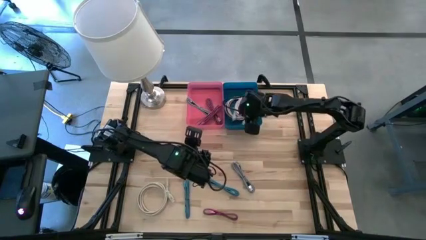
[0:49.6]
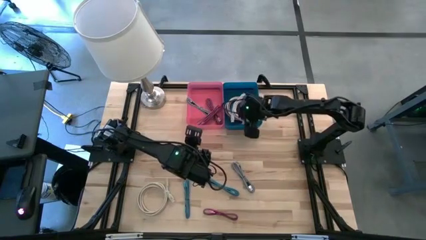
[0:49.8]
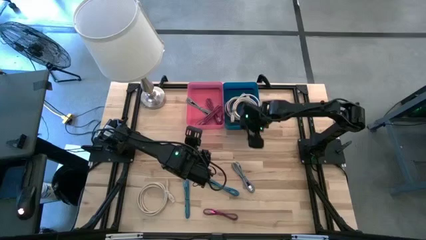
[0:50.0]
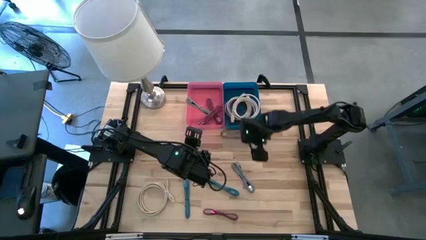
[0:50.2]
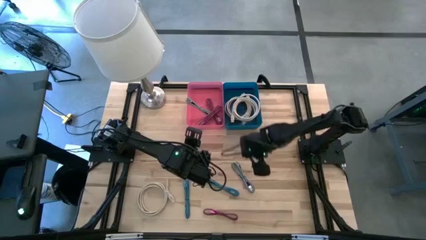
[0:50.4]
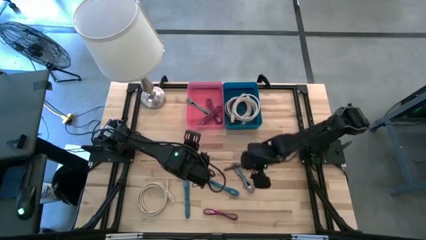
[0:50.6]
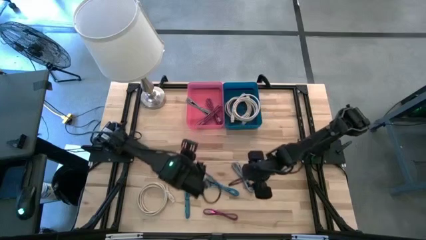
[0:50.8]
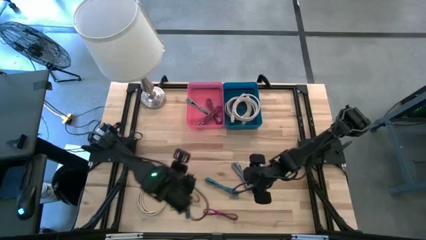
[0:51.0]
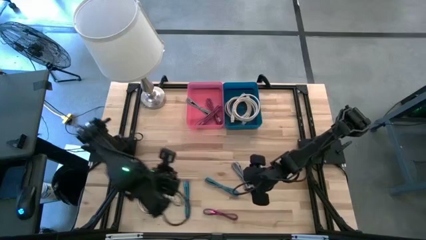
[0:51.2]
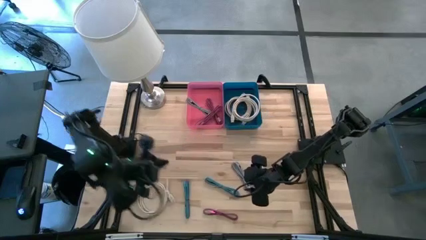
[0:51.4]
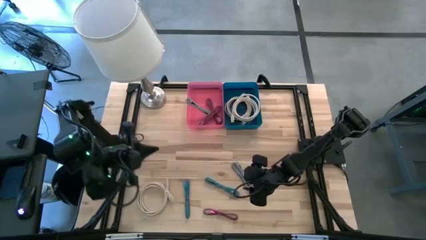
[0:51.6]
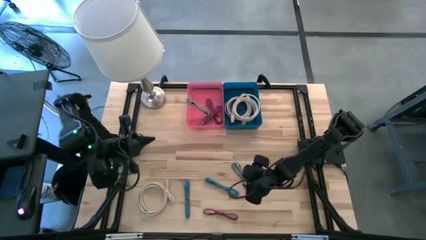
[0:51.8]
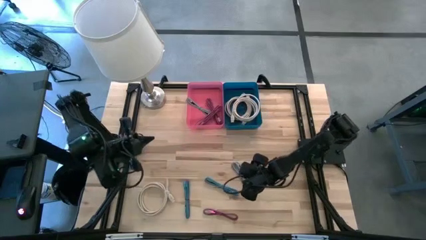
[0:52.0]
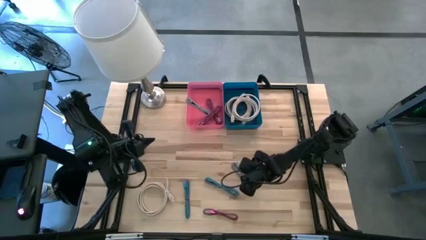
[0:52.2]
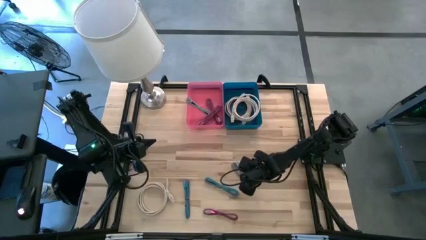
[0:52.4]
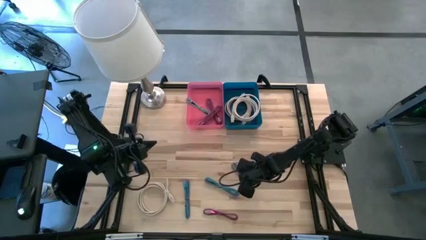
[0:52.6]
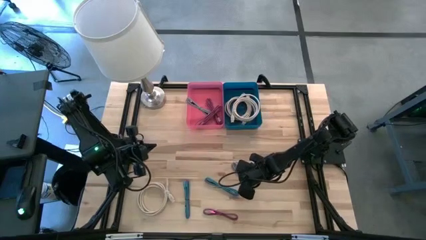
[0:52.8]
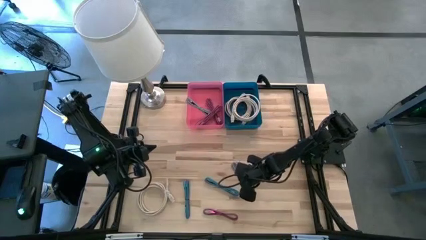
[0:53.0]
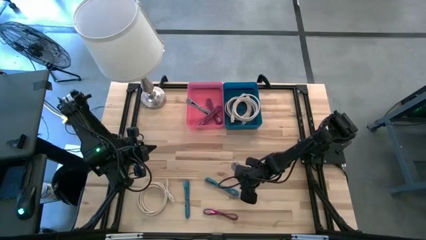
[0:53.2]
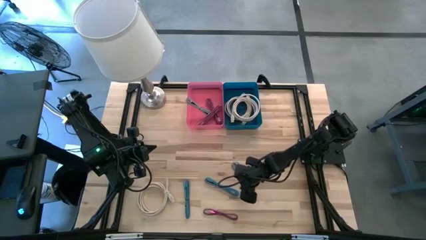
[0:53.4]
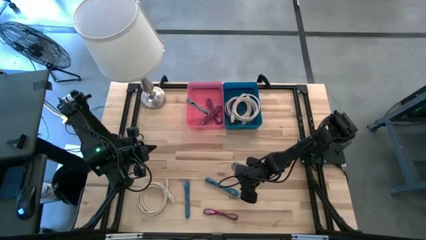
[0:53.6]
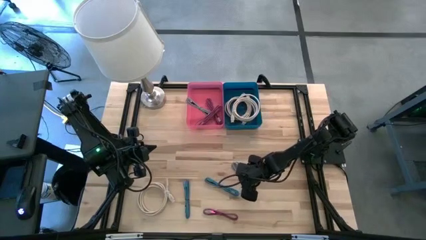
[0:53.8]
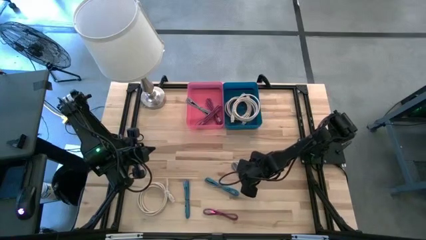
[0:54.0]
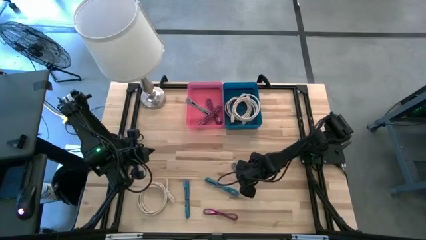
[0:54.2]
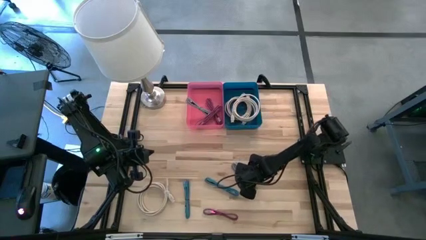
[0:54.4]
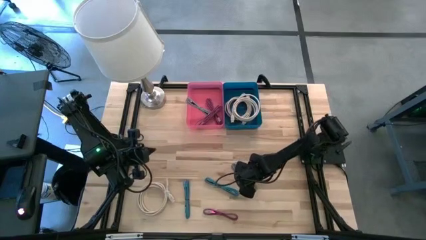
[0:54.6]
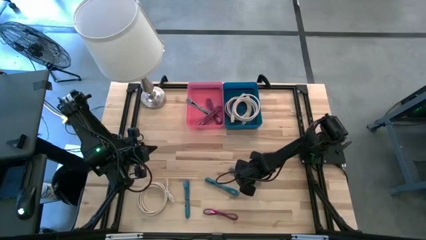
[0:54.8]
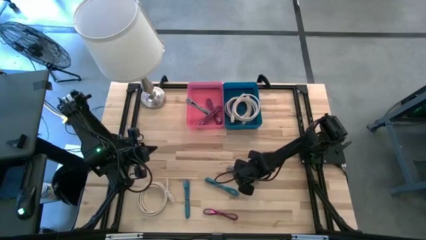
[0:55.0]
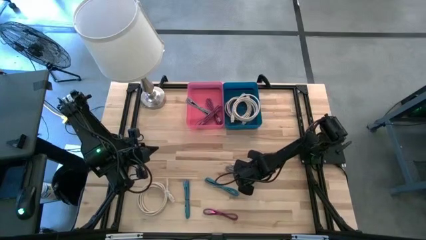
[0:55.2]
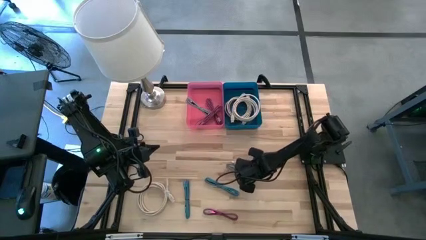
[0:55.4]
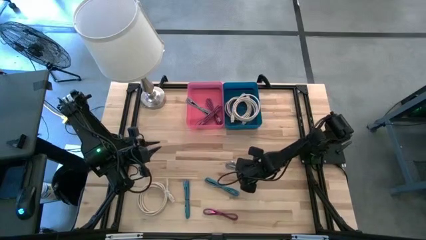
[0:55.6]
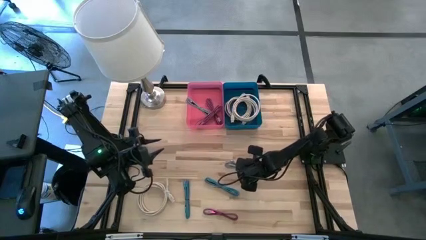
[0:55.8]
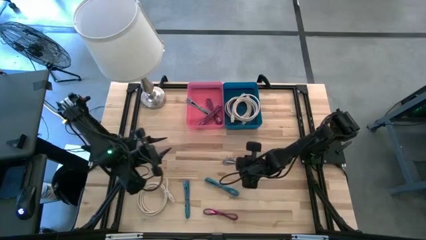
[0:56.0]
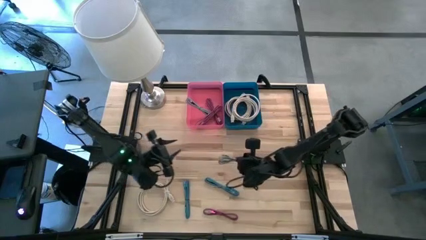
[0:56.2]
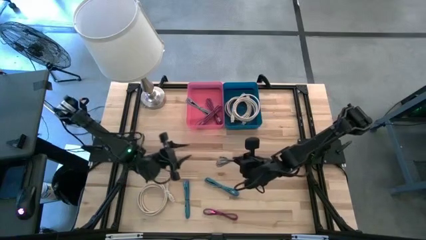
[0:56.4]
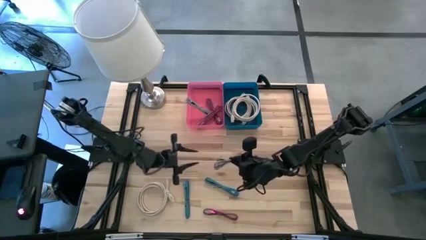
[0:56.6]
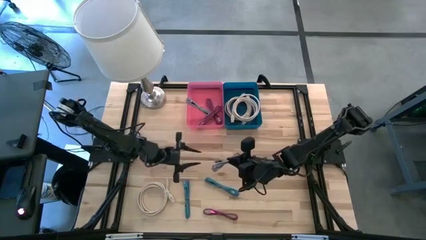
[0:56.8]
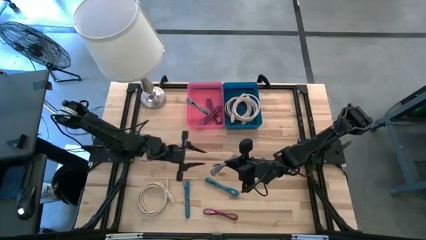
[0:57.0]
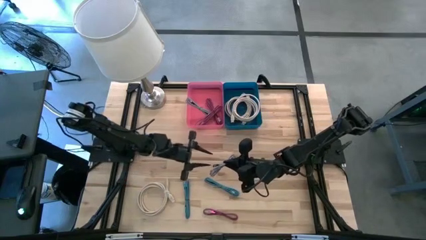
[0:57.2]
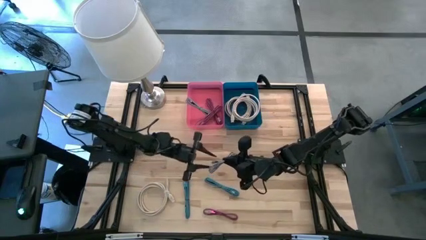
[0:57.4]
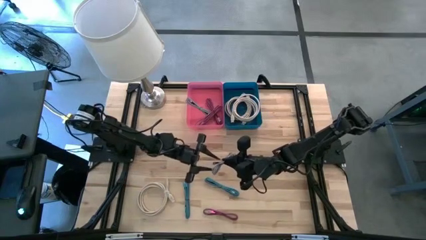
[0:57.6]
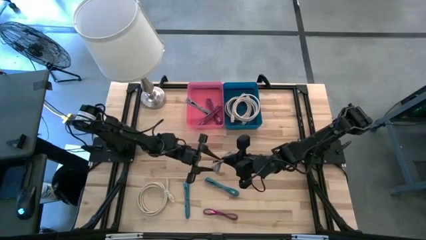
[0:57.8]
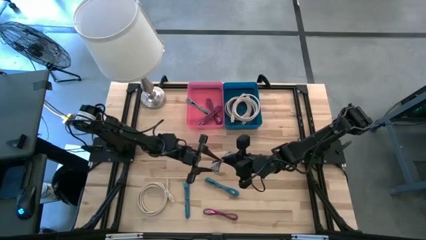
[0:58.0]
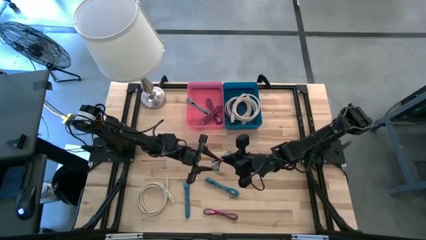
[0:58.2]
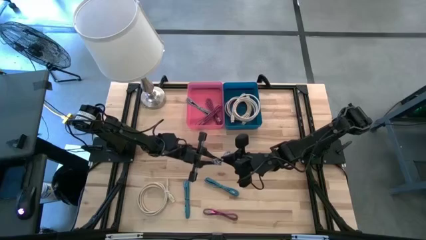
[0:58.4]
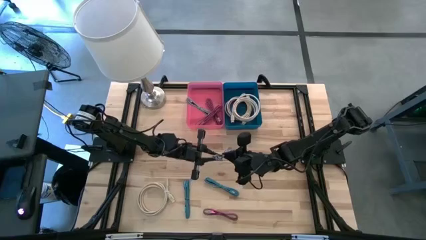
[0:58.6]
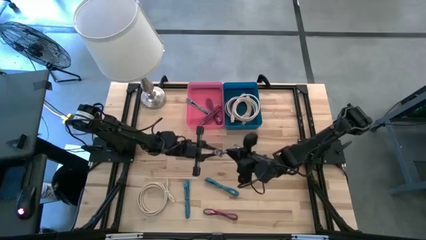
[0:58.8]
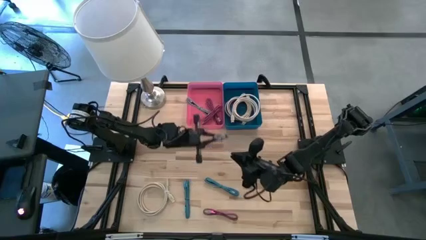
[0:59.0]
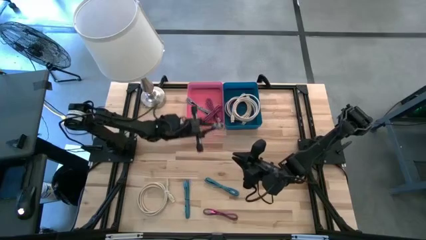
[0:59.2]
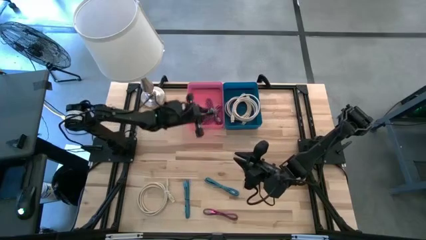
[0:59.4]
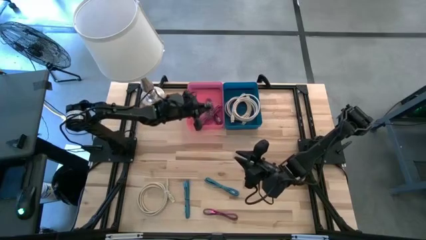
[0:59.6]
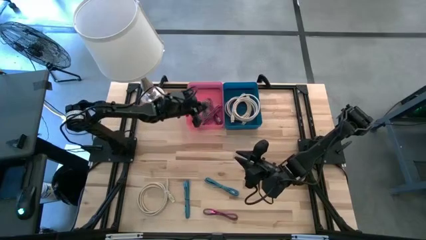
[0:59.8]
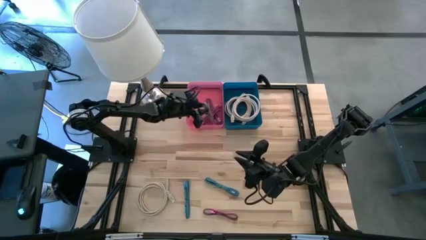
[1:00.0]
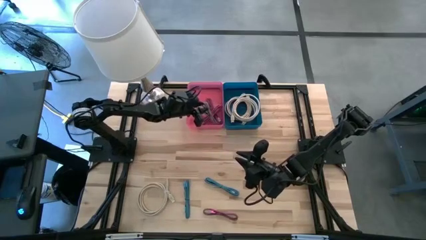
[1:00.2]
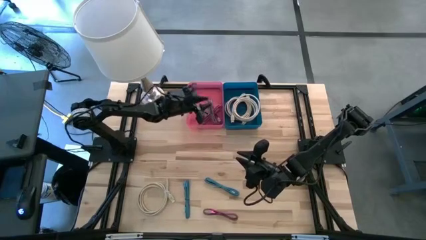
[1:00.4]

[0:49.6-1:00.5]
Task: Pick & Place USB Port
Put the black white charger cable into the pink bin

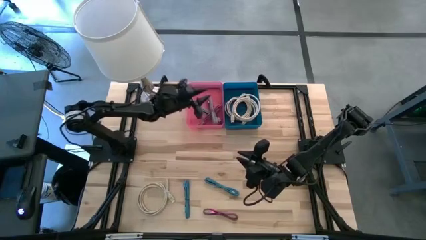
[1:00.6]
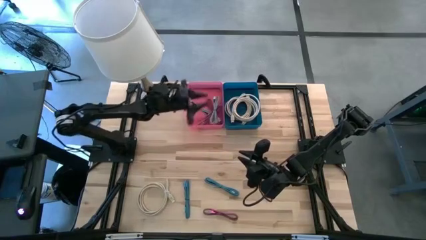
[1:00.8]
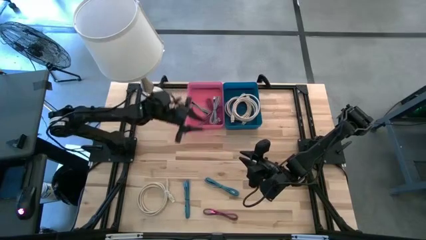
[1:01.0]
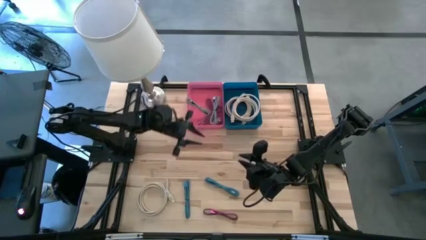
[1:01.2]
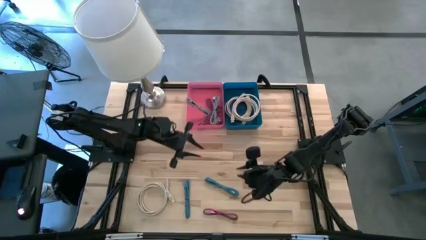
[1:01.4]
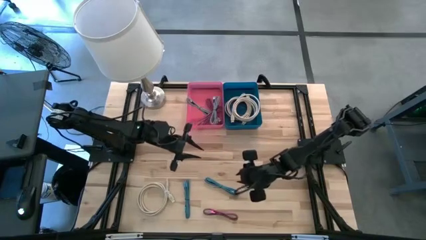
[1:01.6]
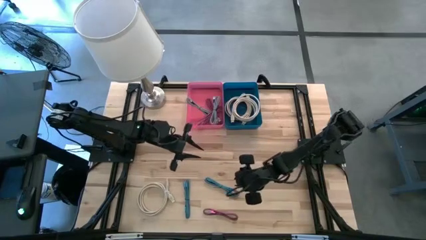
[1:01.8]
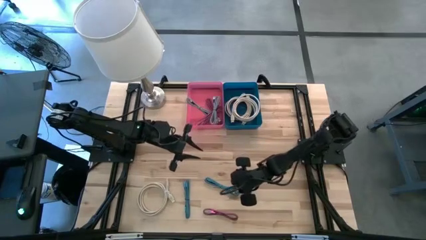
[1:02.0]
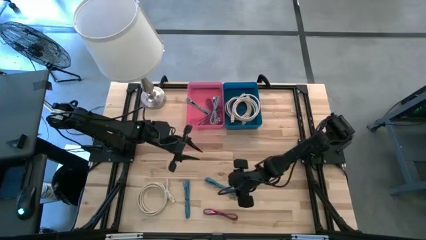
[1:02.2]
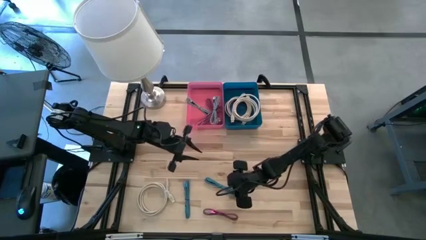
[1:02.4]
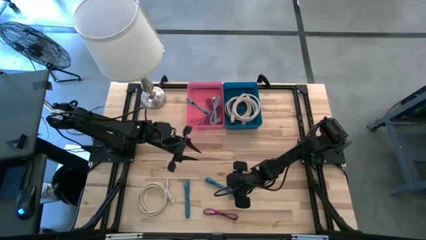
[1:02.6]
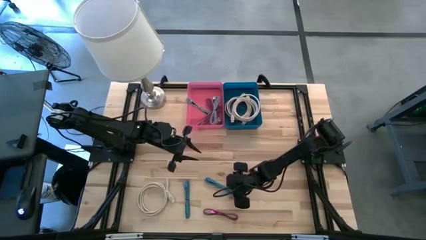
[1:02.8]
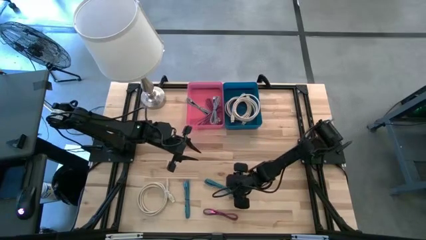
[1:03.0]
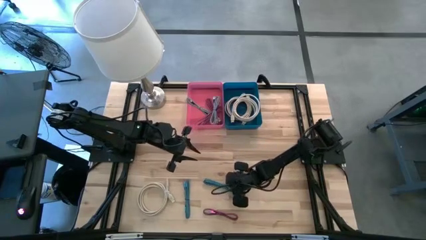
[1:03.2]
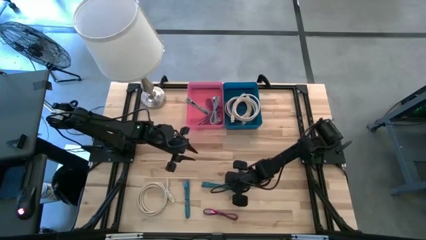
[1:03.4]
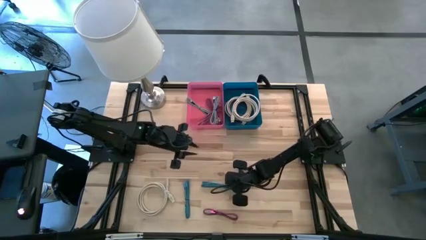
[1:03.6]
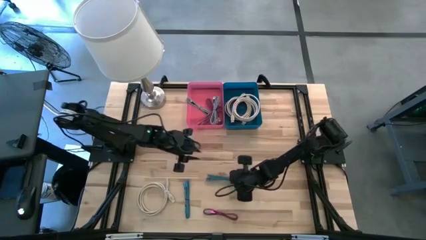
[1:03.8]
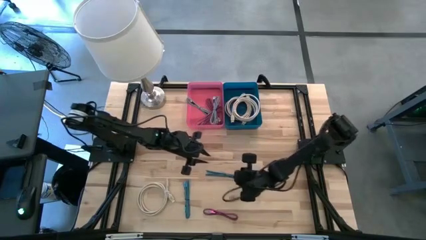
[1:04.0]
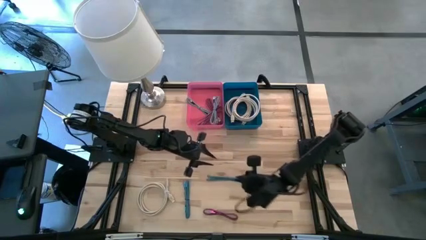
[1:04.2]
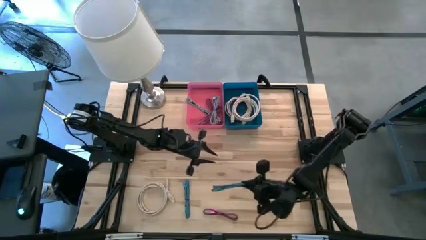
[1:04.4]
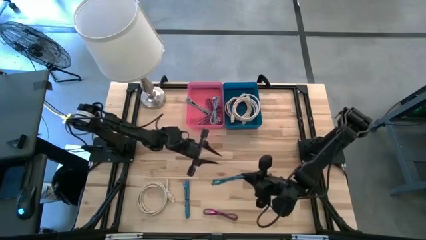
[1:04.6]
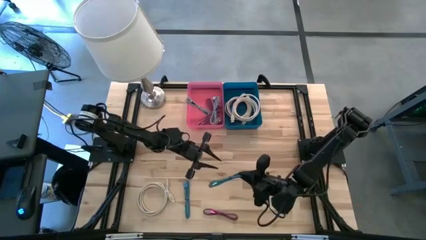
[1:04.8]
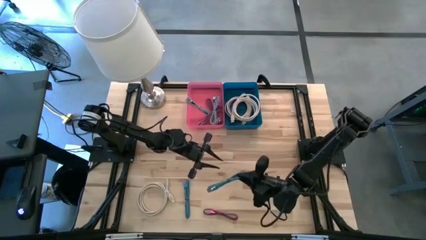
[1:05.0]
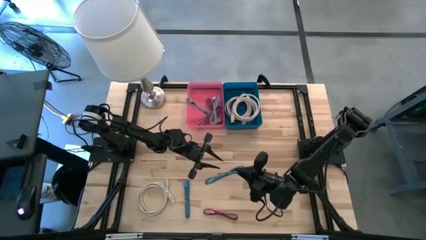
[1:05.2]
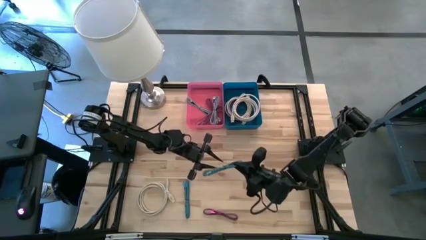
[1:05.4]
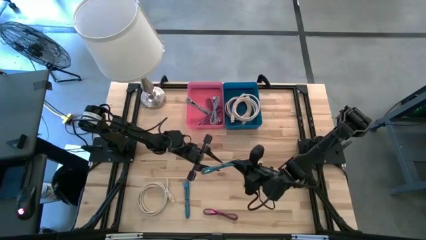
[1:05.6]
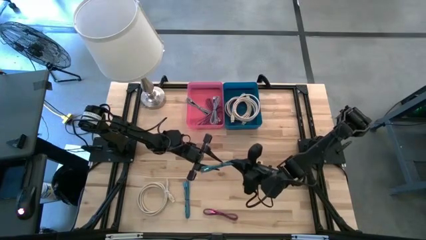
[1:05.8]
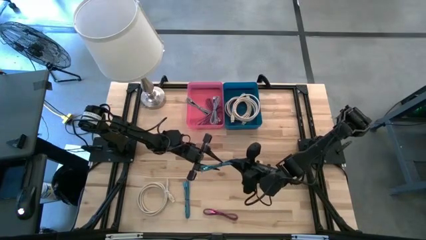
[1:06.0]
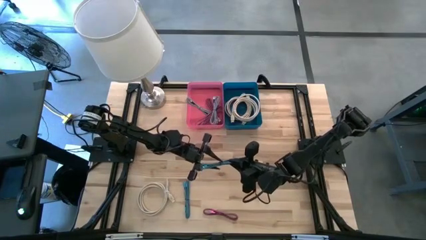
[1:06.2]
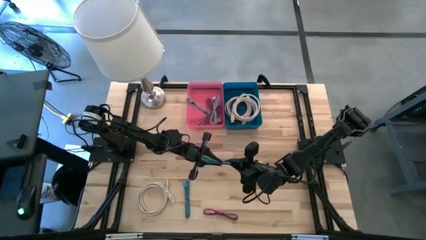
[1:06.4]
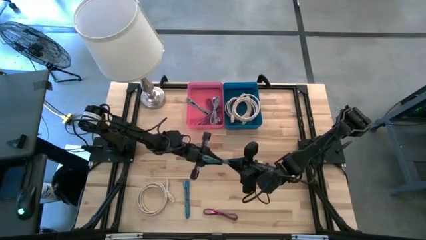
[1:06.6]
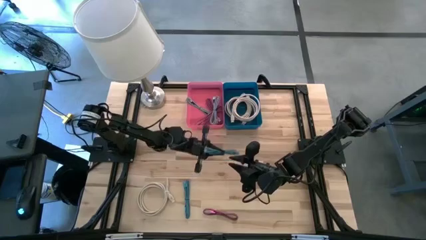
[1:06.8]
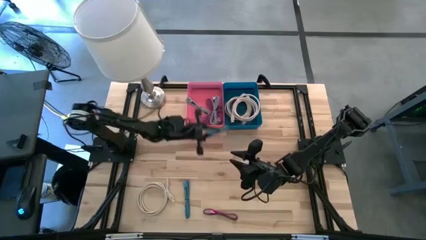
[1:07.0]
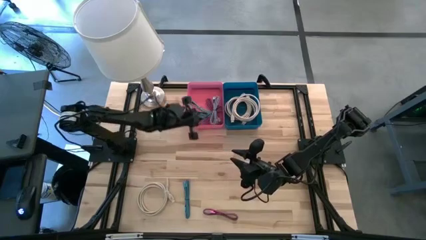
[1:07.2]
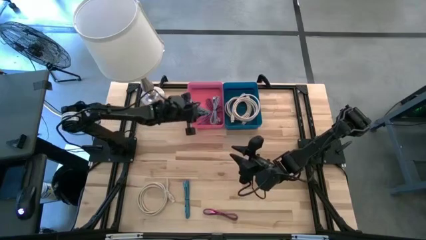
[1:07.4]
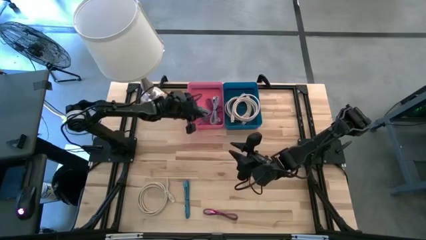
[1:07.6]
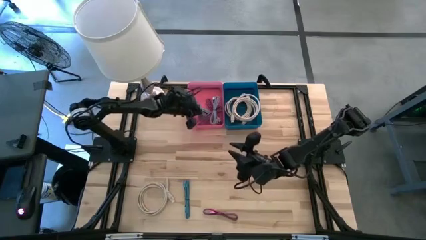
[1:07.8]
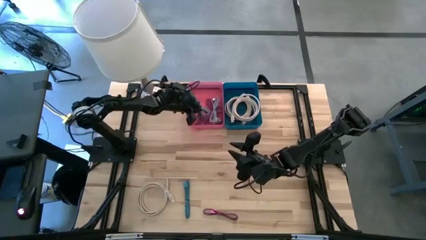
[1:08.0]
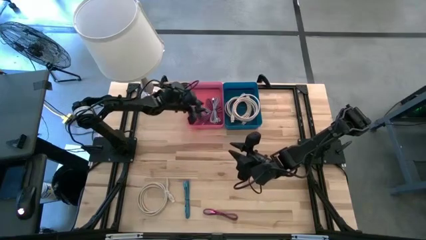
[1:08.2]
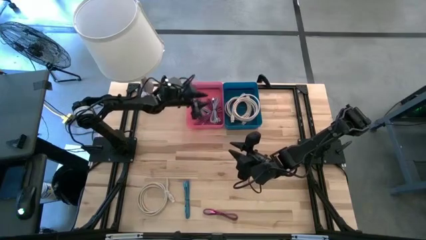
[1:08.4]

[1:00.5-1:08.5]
Put the right blue charger cable into the pink bin
